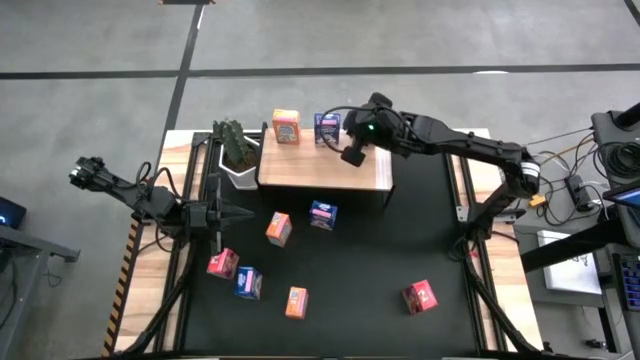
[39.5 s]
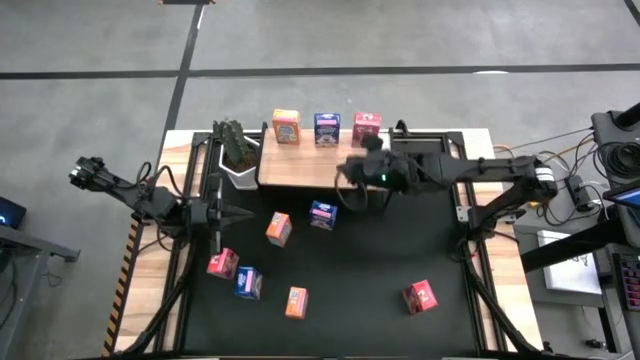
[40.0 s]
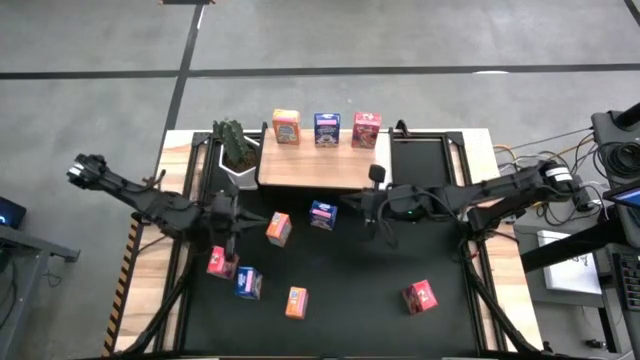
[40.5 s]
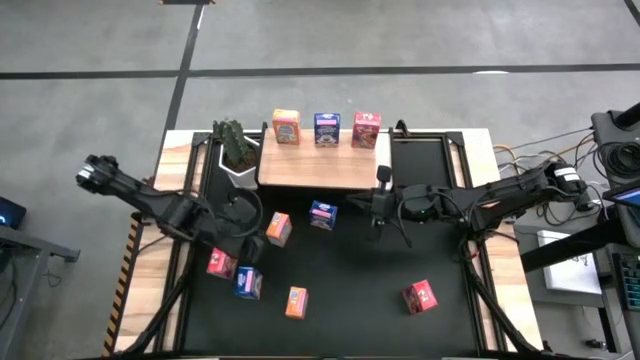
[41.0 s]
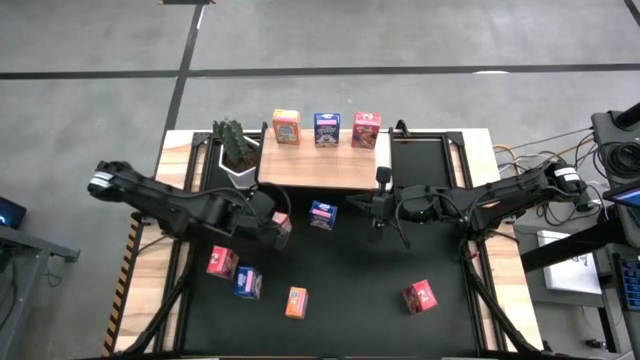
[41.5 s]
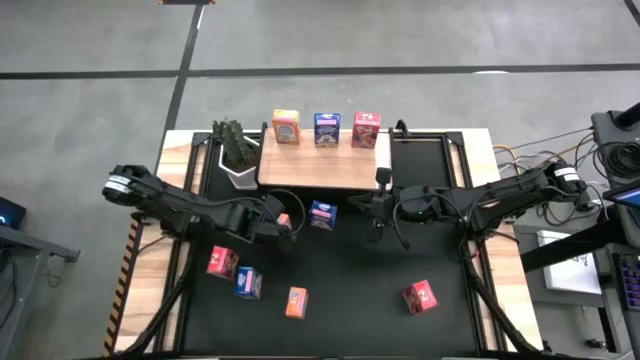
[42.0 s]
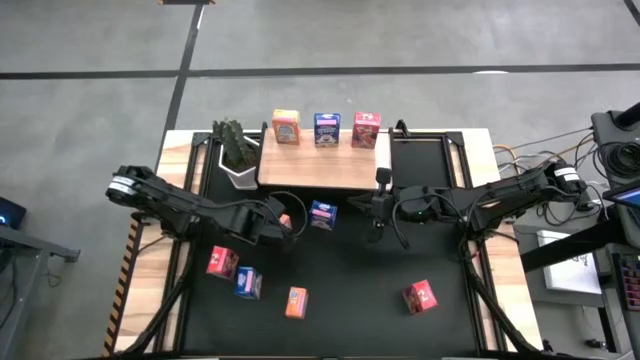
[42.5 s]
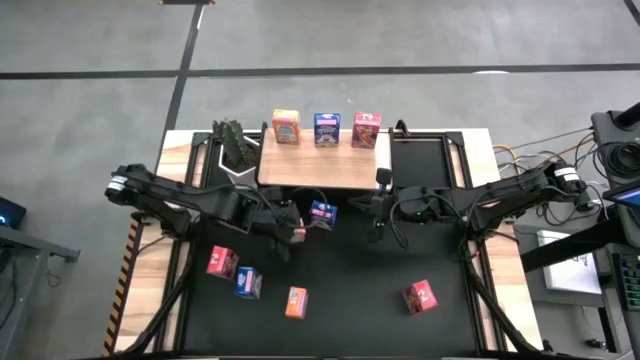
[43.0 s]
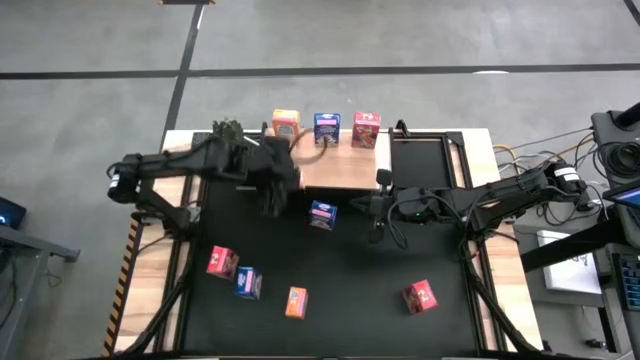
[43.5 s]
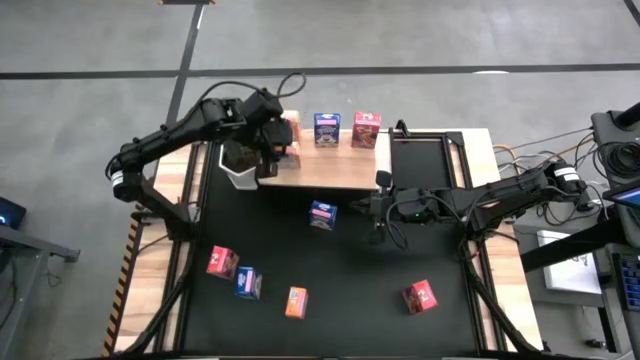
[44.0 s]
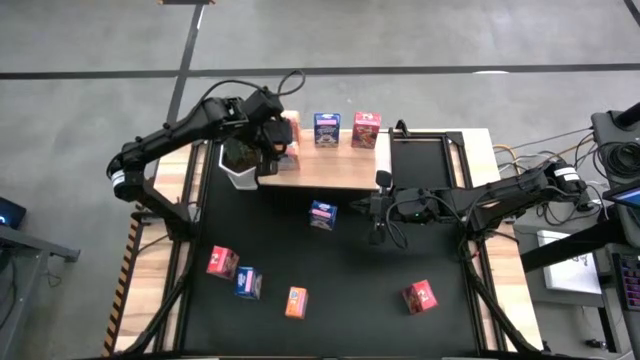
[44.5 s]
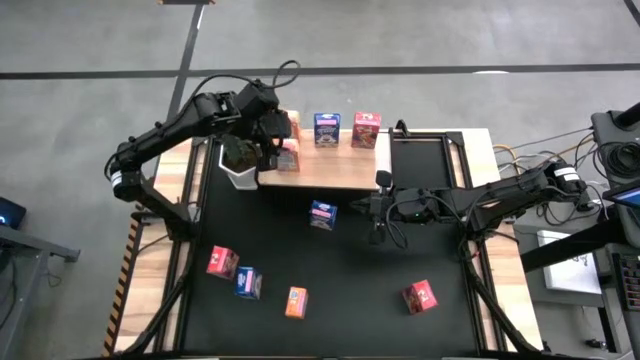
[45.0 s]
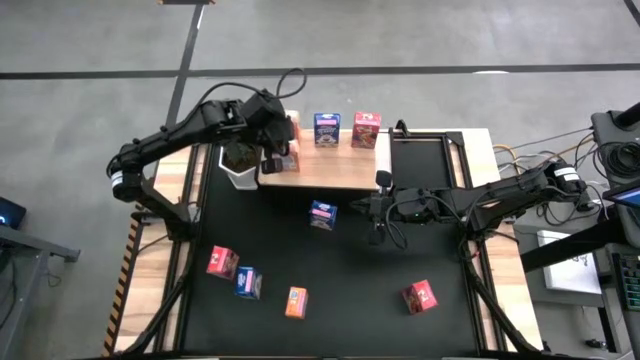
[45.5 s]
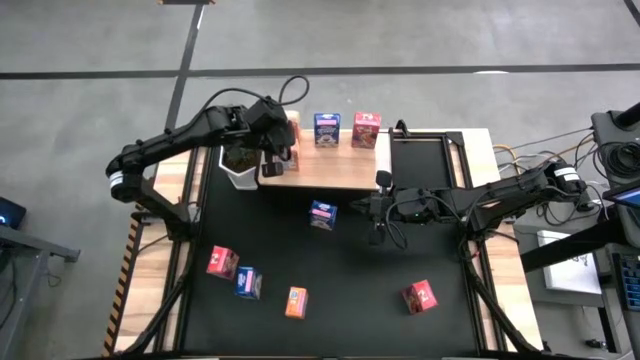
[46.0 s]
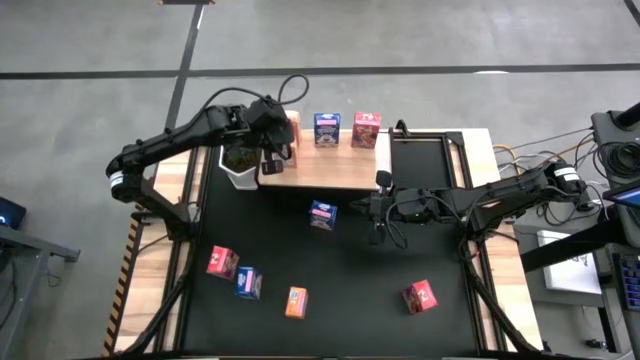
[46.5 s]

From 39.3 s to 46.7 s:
Task: Stack cereal on shelf
Put the top orange cereal box on the shelf aligned with the other orange cereal box

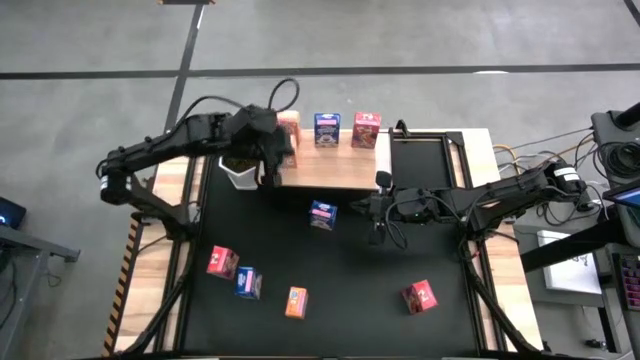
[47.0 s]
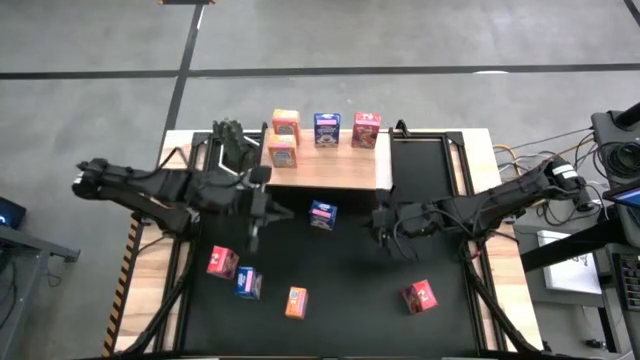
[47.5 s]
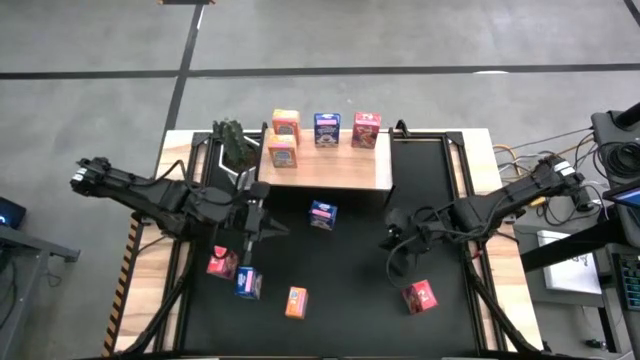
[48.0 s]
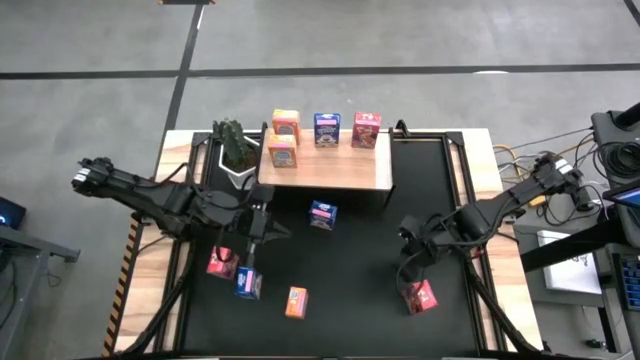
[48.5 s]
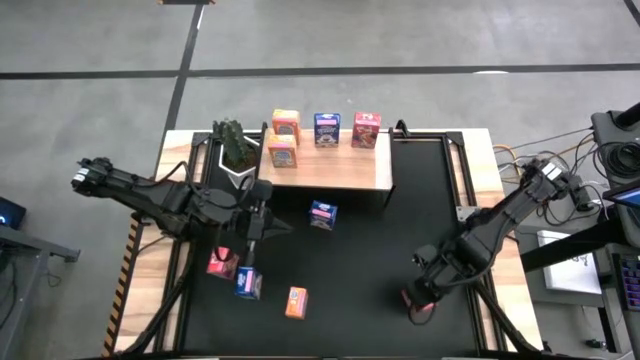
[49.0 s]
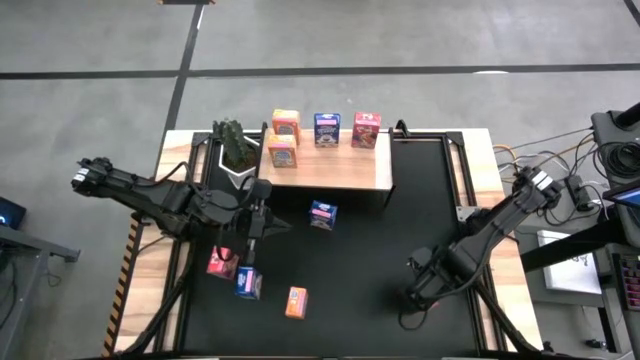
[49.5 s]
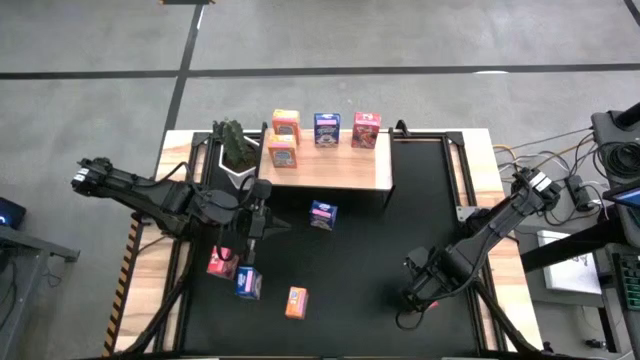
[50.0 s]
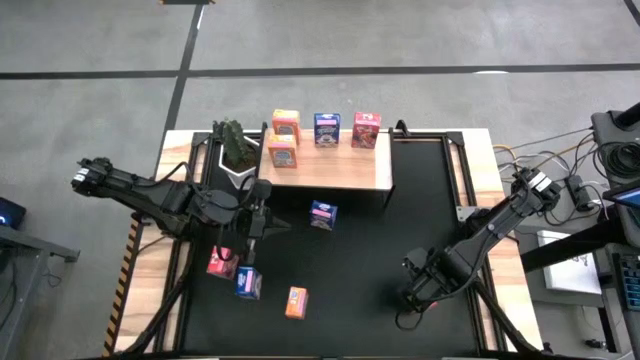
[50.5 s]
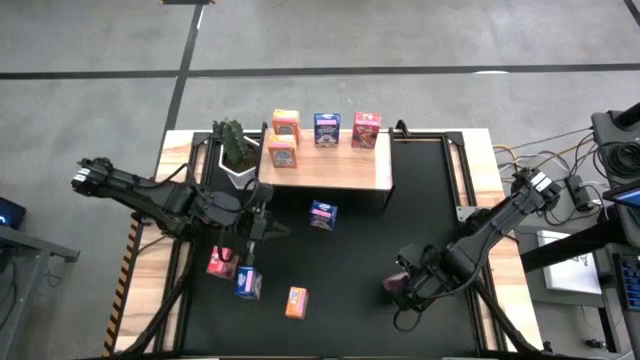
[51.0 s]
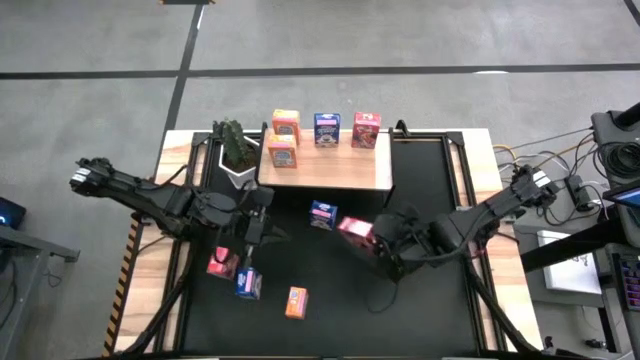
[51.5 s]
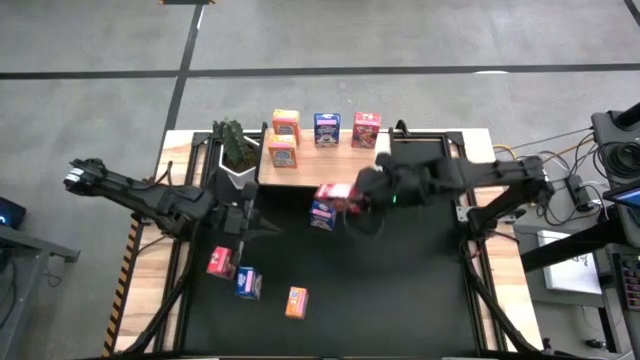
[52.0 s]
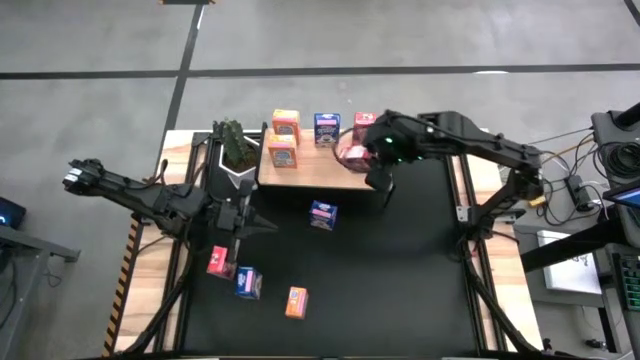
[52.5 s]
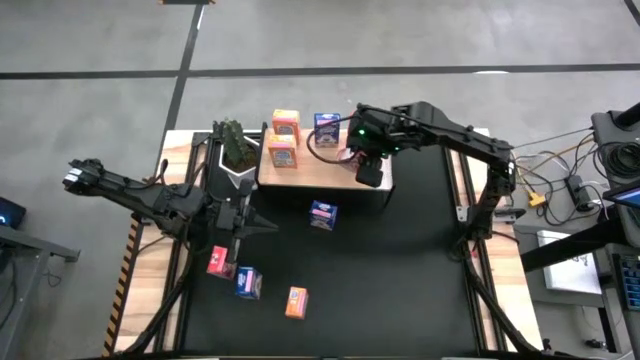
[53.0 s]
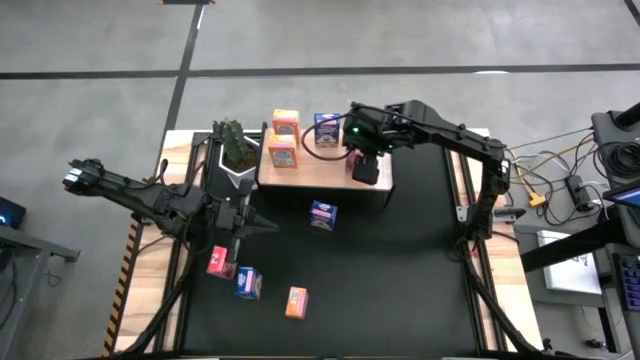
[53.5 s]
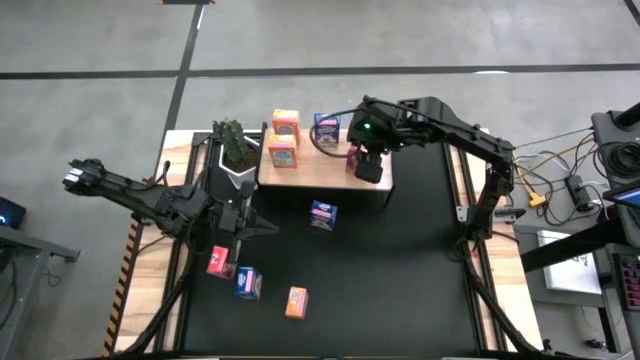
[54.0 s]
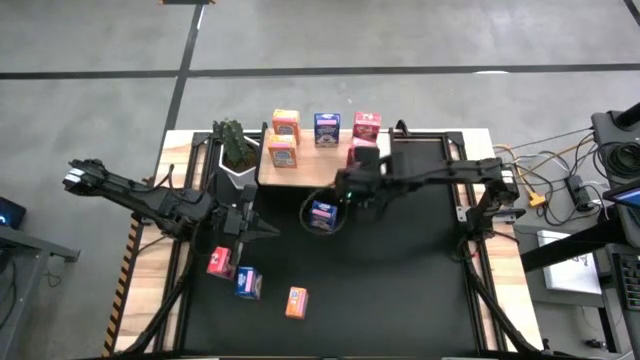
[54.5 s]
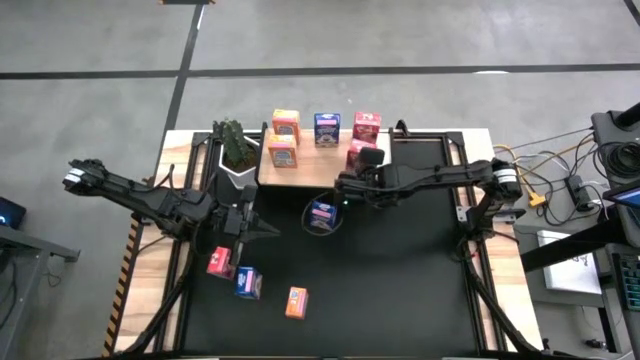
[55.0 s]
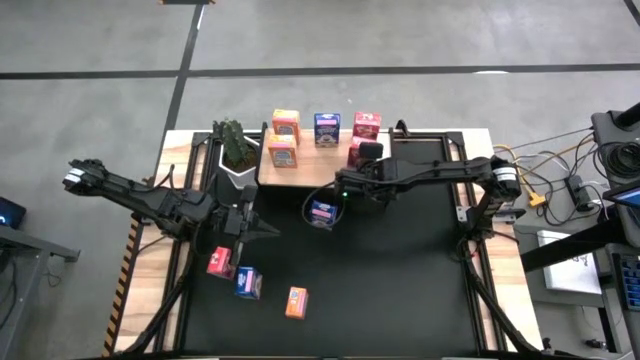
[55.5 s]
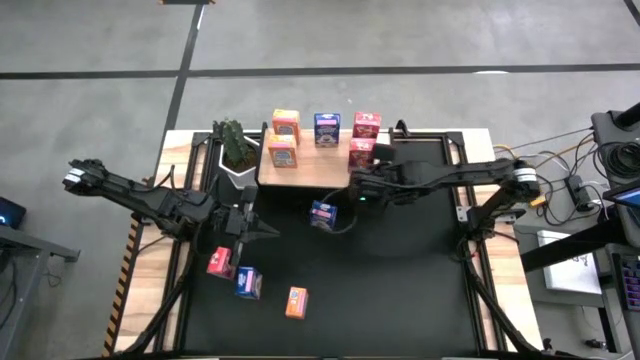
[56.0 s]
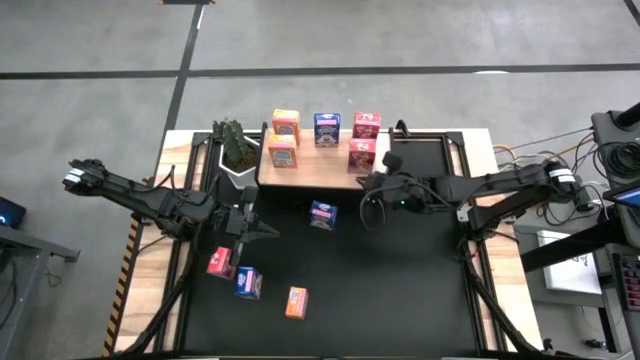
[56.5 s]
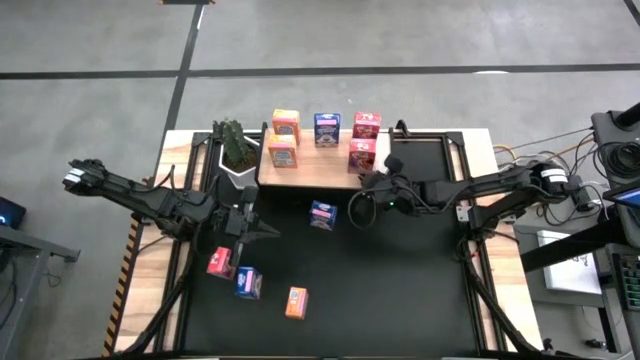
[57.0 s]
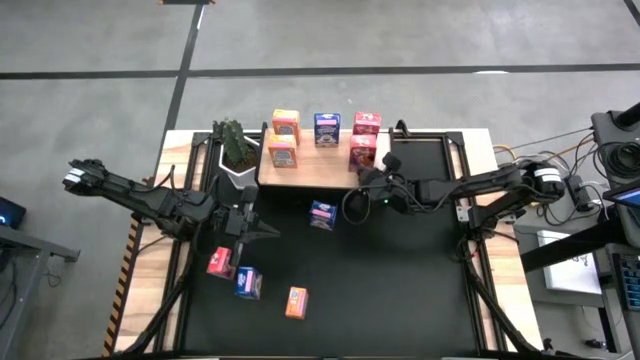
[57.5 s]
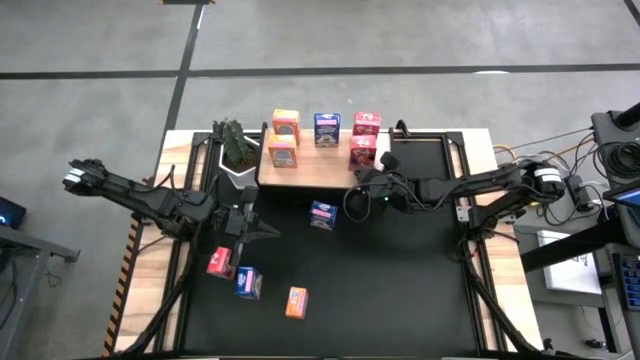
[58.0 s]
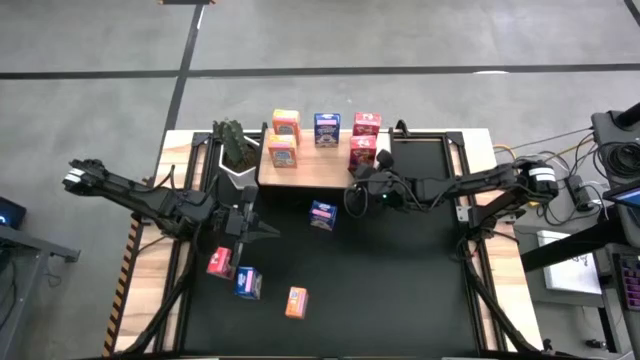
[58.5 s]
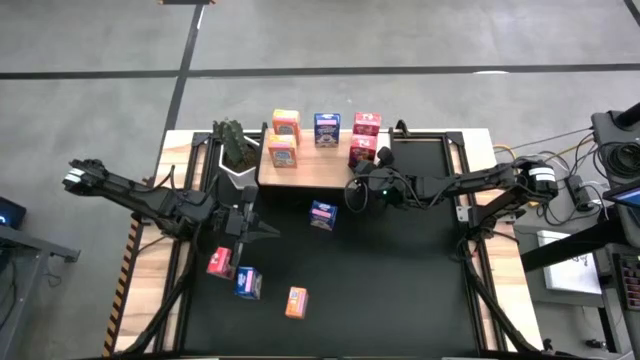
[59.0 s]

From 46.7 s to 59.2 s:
Put the right red cereal box on the shelf aligned with the other red cereal box

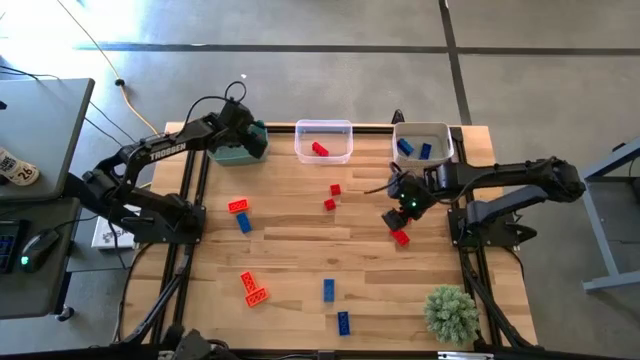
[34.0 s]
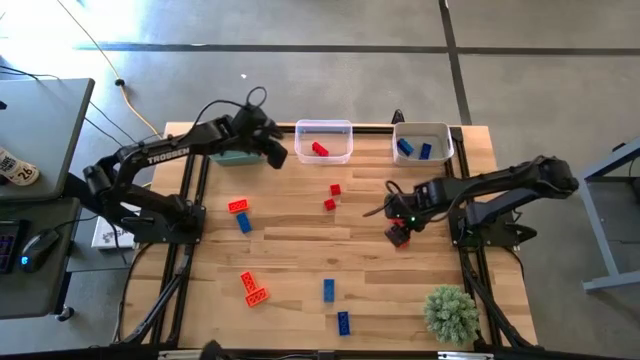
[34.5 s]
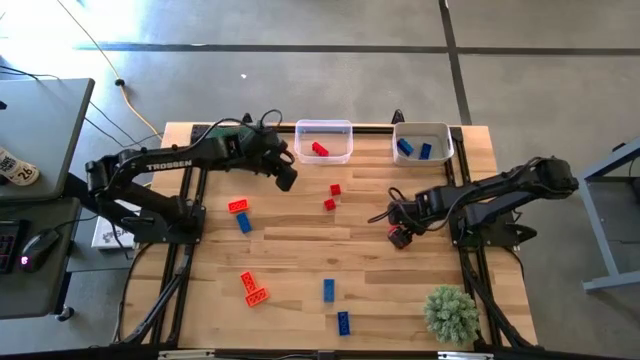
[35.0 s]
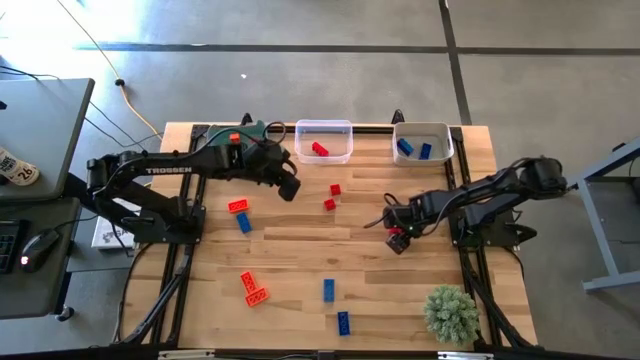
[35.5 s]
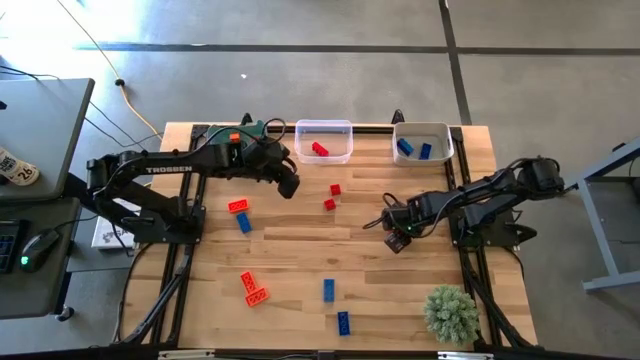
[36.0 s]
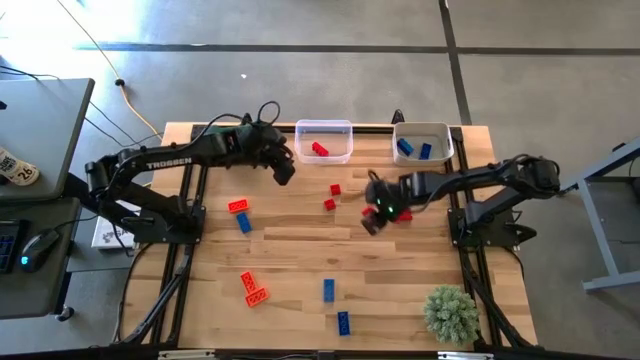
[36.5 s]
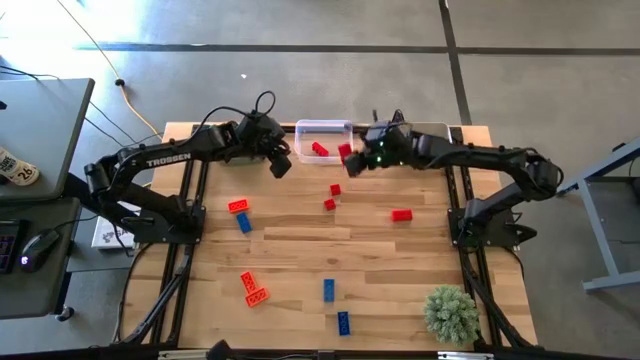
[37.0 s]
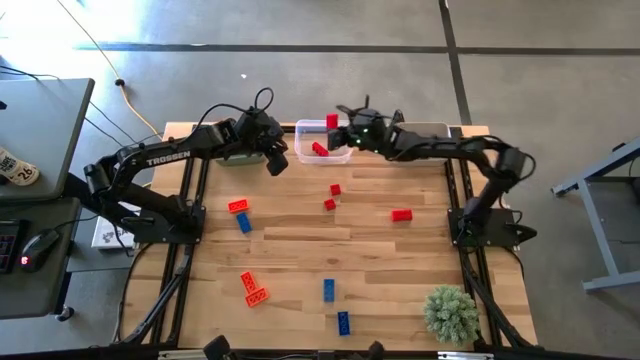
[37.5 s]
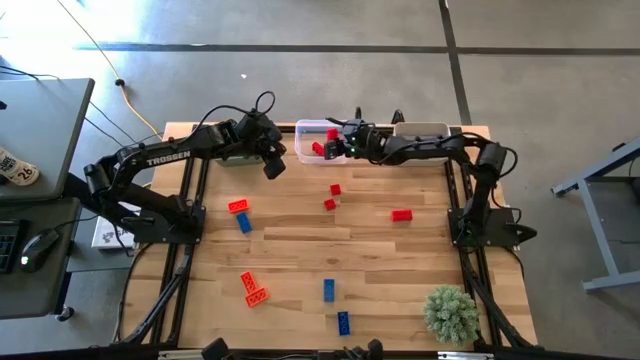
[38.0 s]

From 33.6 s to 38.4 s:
Task: Sort & place blocks by color
Put the red game piece into the transparent bin
